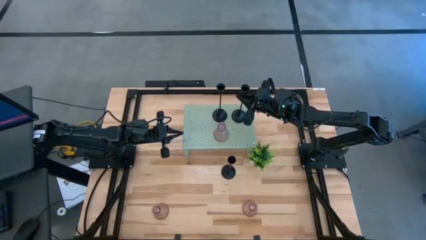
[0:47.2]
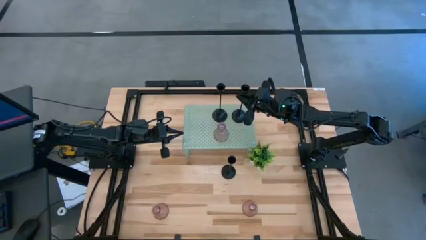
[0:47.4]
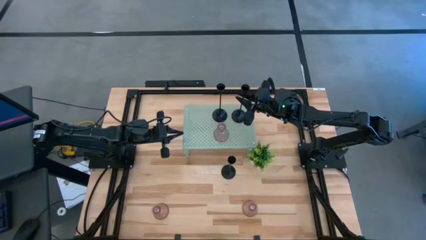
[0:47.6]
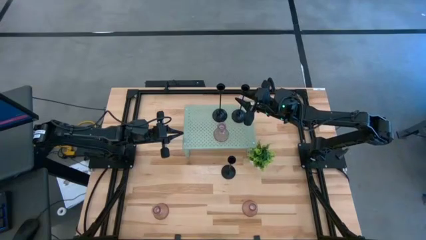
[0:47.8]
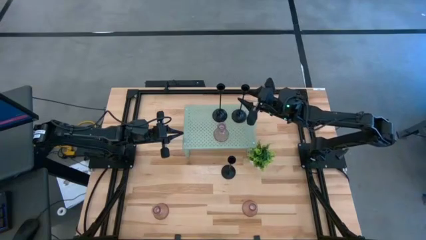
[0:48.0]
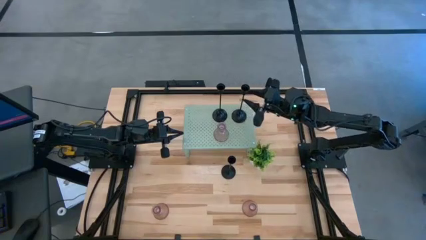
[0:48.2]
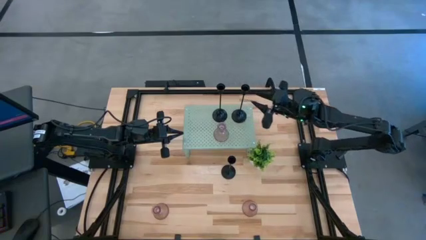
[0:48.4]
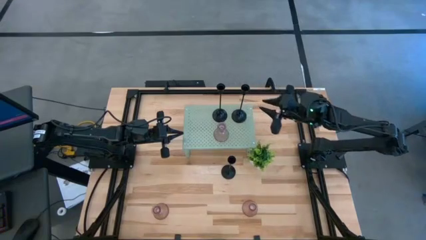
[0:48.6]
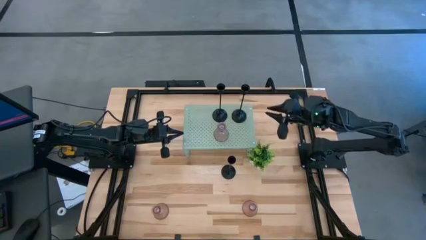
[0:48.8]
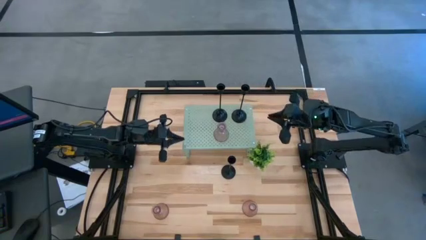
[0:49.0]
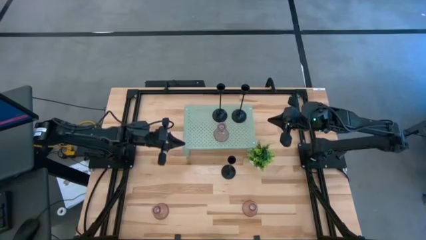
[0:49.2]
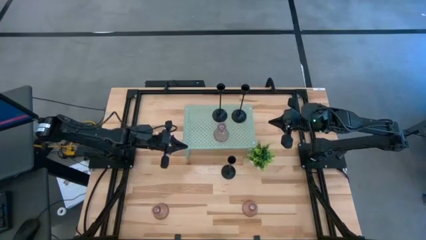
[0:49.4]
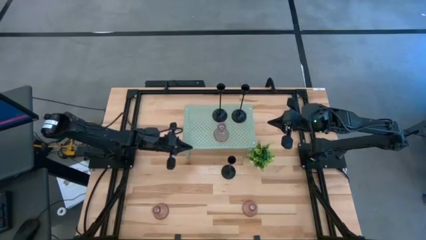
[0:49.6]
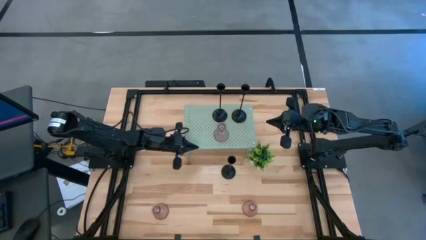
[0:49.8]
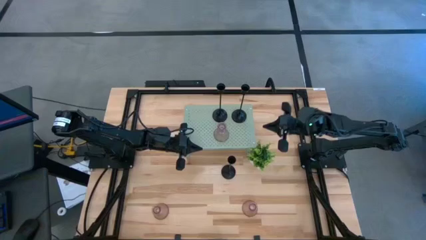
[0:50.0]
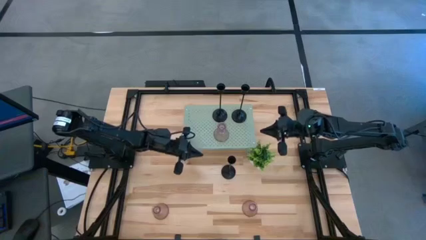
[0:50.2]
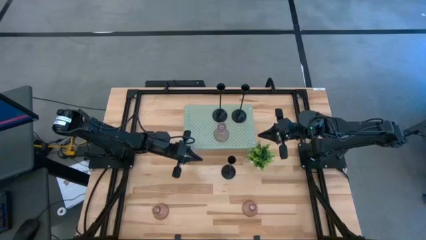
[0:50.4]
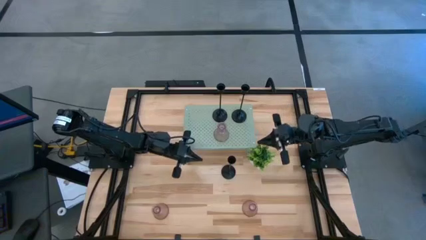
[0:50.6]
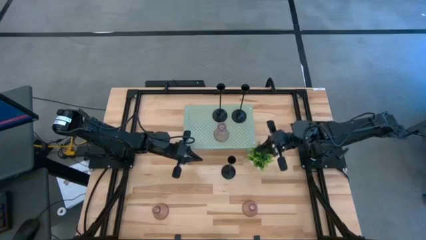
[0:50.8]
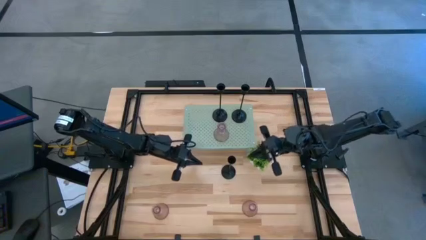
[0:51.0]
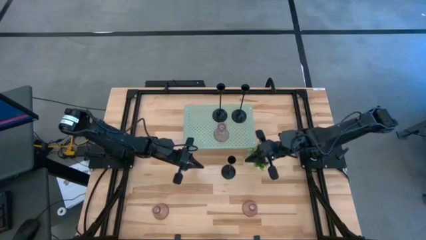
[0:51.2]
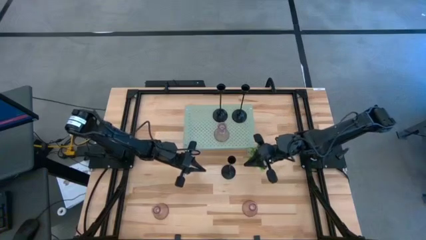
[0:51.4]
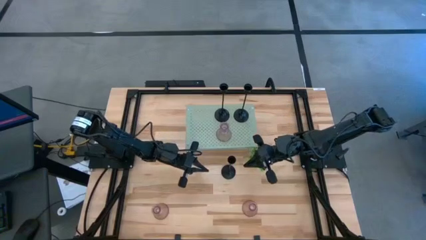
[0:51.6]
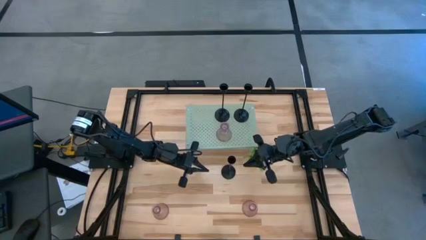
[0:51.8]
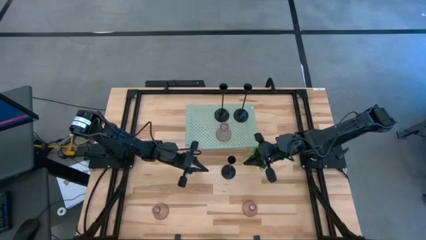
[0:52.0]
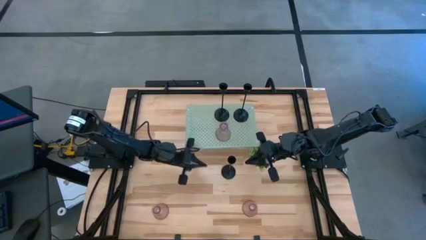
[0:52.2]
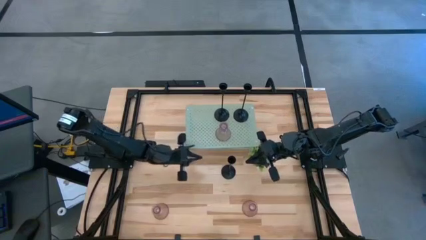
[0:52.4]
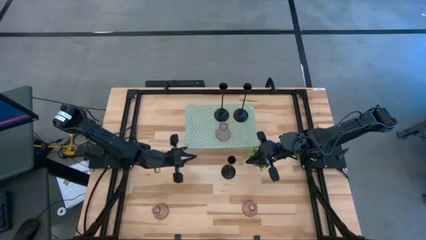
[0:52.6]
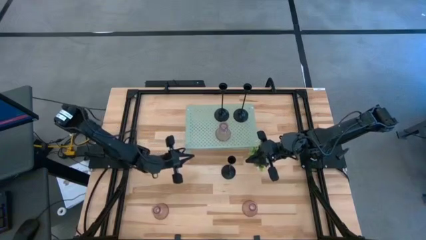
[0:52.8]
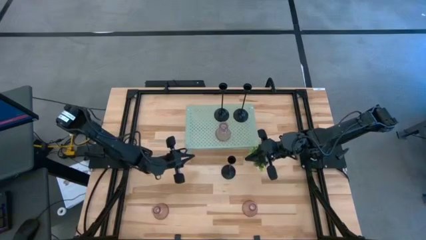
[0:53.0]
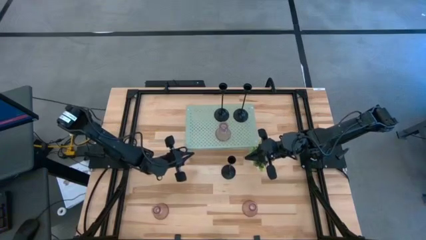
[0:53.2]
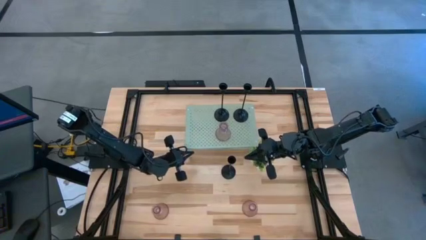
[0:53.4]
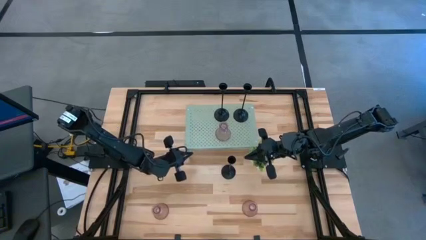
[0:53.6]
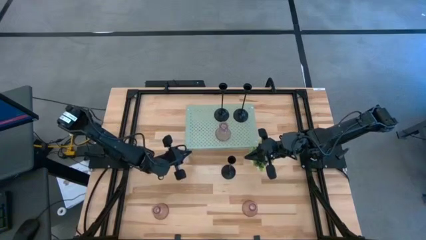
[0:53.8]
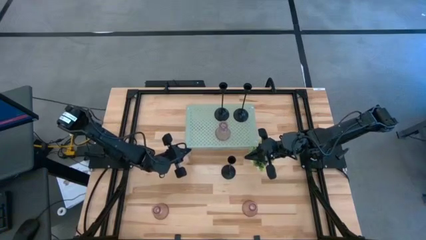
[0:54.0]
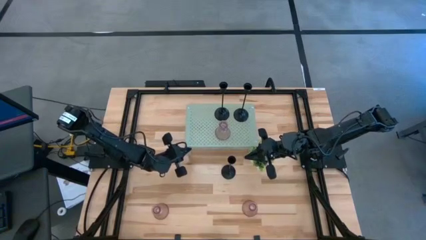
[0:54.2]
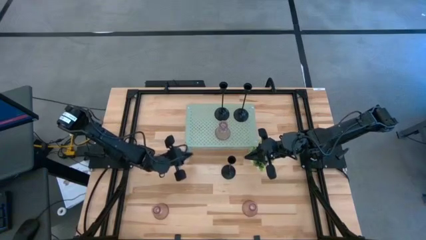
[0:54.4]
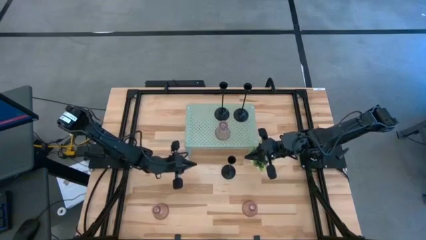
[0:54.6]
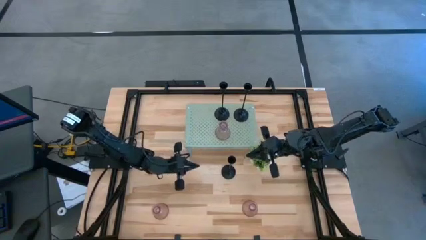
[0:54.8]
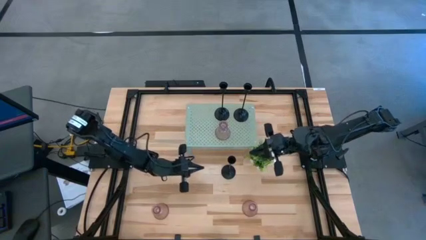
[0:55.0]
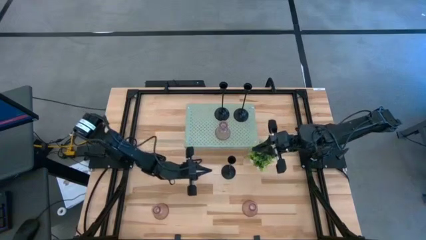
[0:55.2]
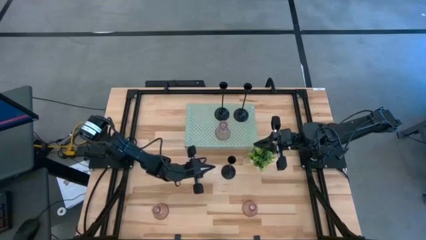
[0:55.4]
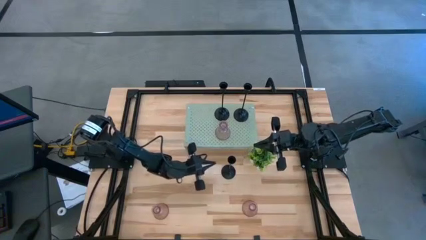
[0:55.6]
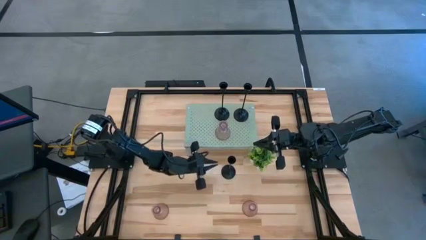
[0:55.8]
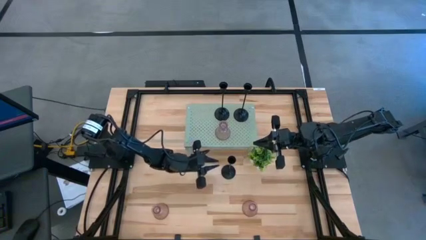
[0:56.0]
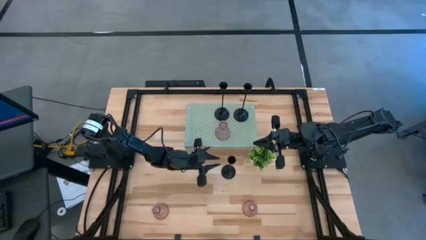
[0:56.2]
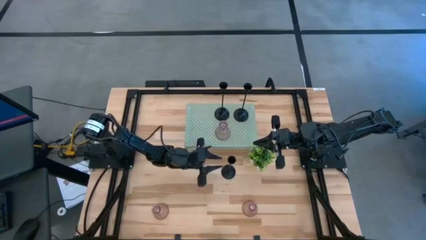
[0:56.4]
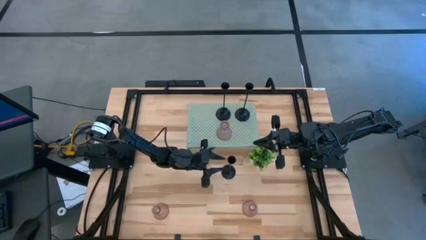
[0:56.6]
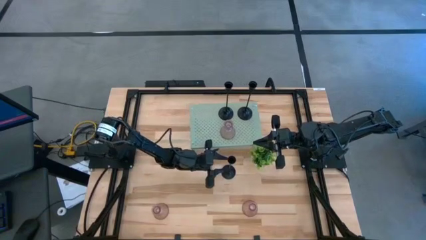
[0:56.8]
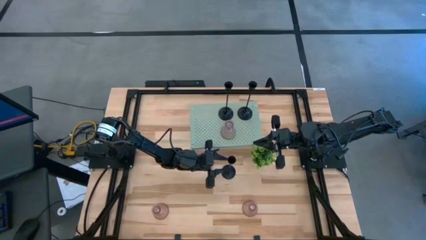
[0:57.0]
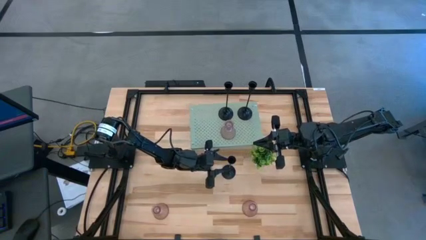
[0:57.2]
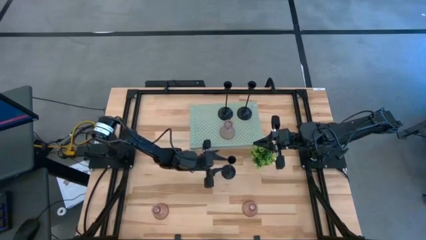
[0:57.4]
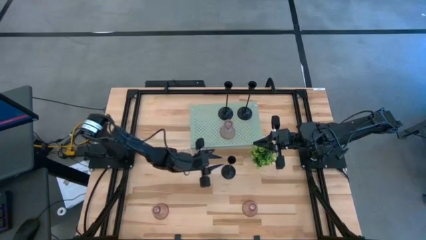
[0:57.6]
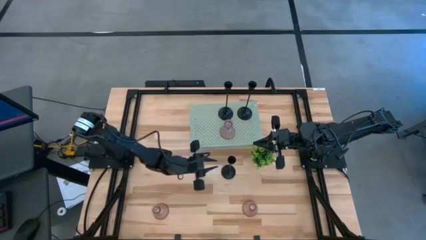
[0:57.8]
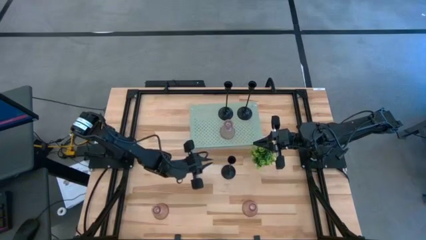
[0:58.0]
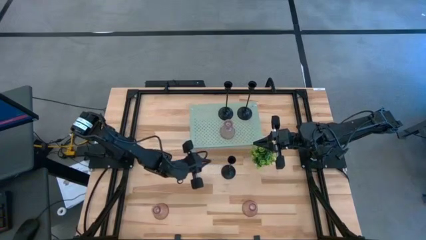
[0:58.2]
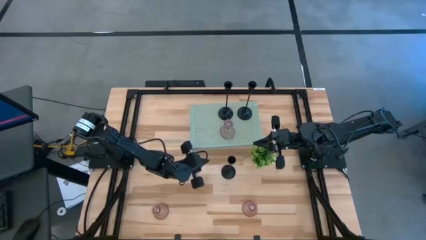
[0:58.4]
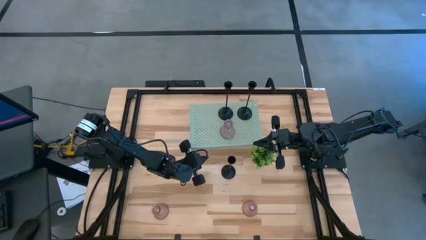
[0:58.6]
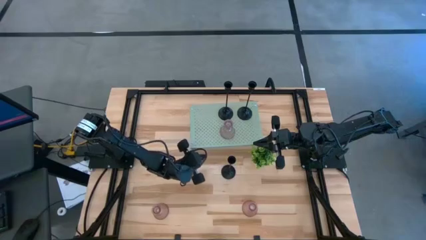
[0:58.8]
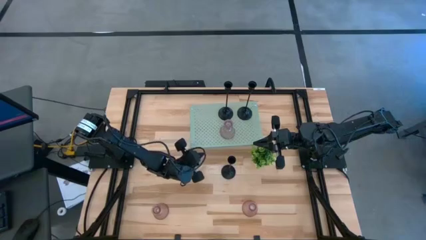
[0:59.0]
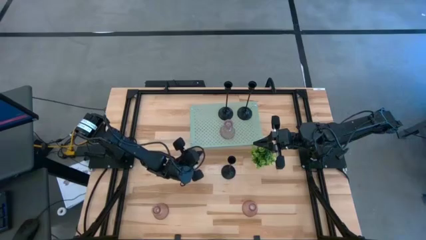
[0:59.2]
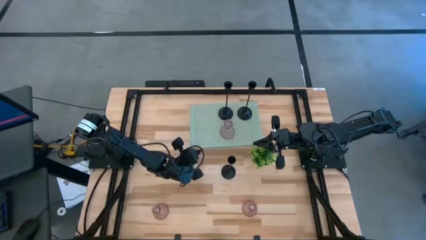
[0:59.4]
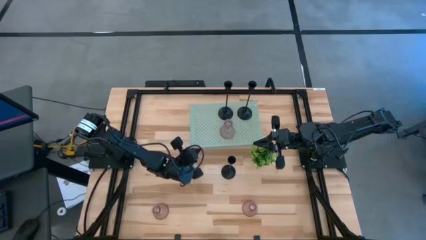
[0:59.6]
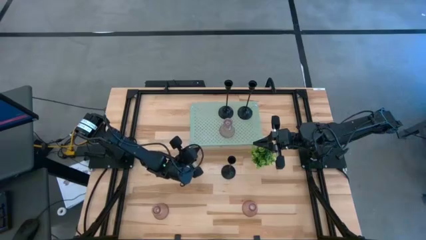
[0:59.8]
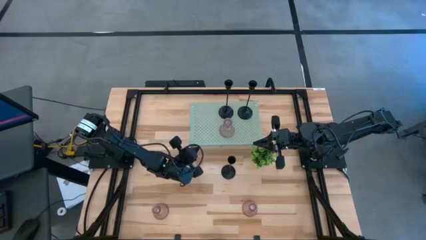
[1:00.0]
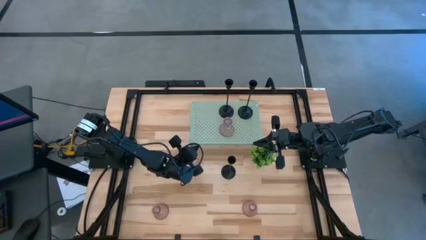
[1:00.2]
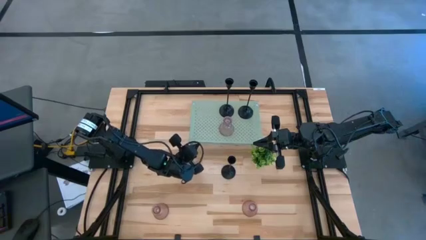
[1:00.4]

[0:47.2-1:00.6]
Task: Pick & Place candle stick holders
Adjust the shelf on the table
